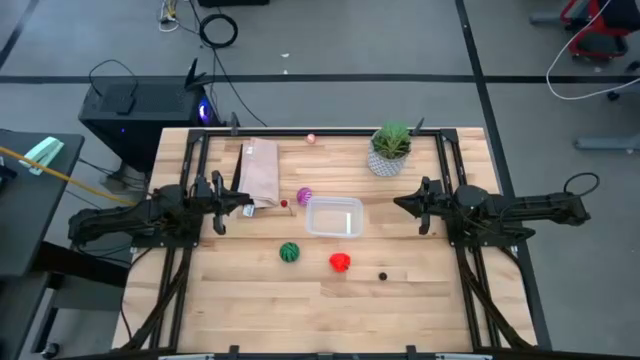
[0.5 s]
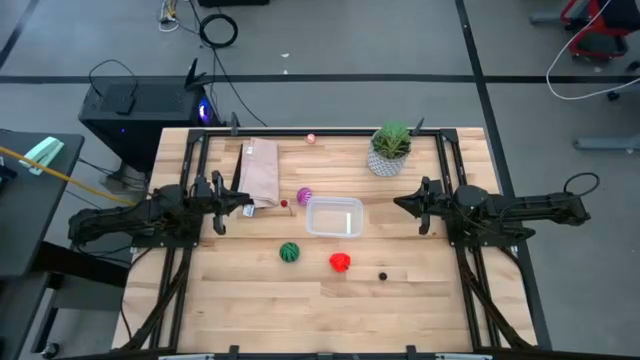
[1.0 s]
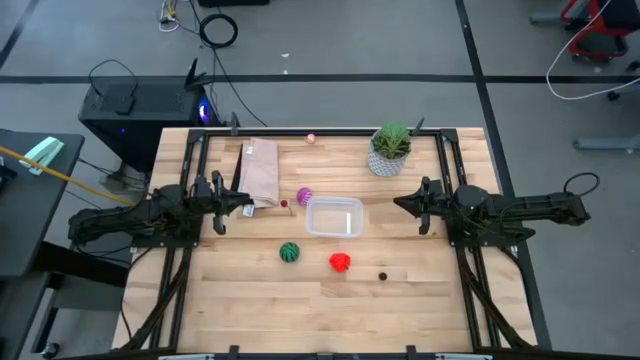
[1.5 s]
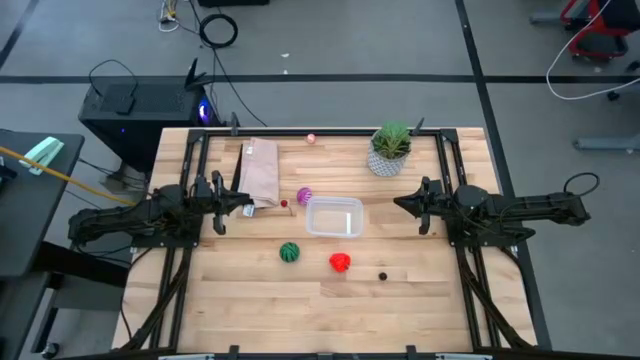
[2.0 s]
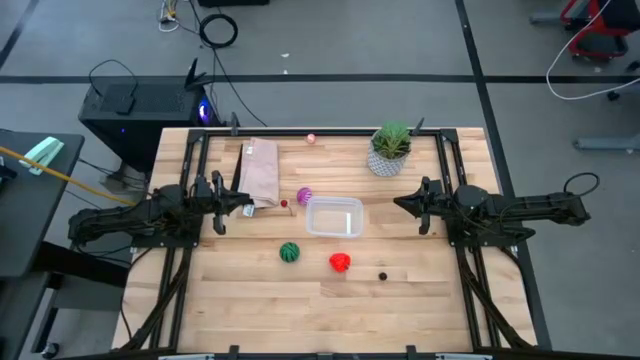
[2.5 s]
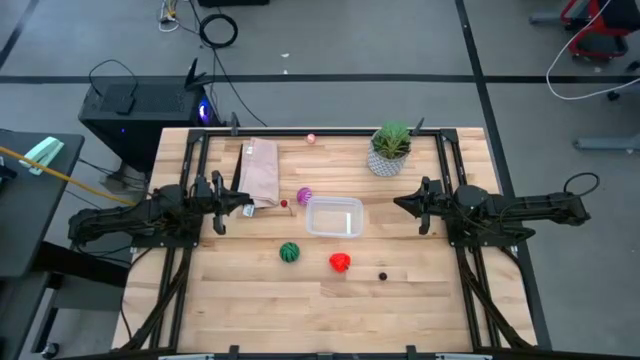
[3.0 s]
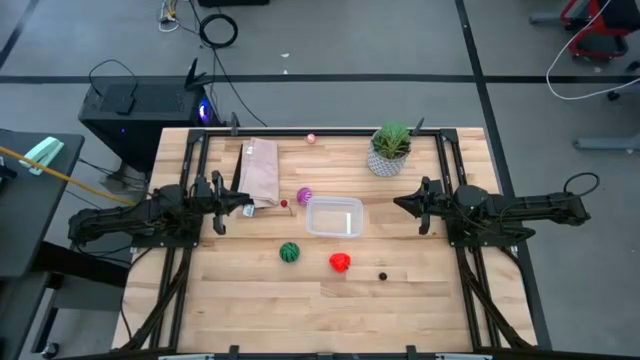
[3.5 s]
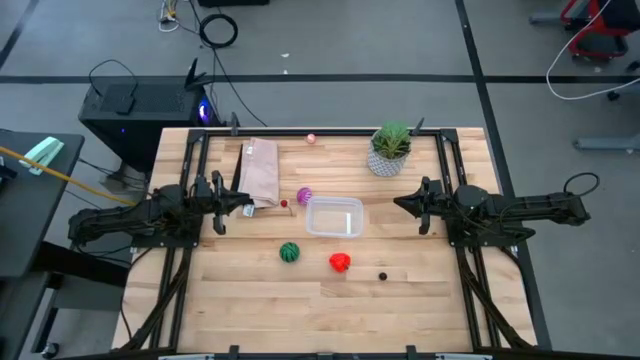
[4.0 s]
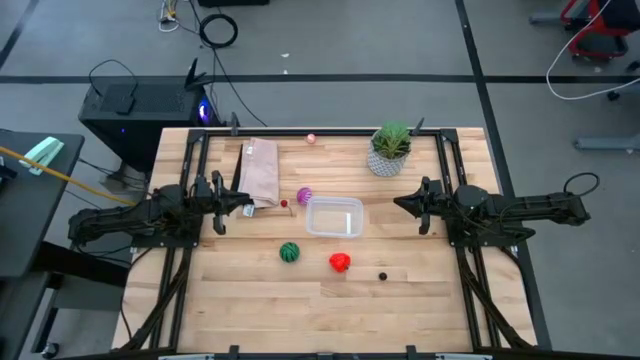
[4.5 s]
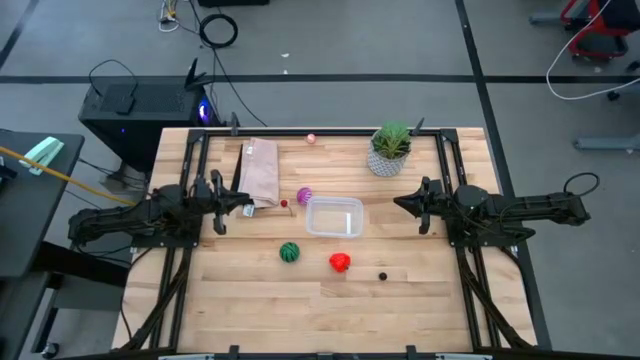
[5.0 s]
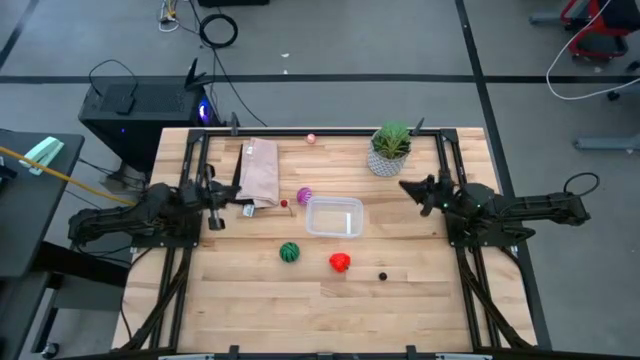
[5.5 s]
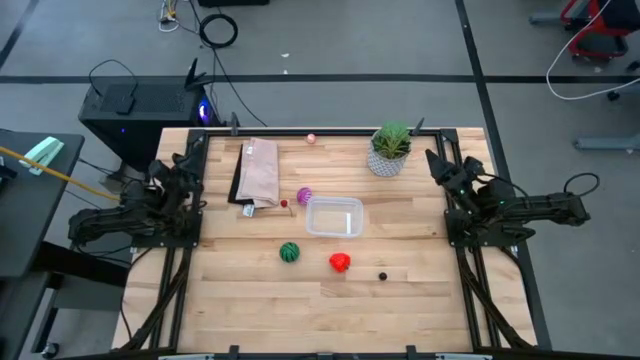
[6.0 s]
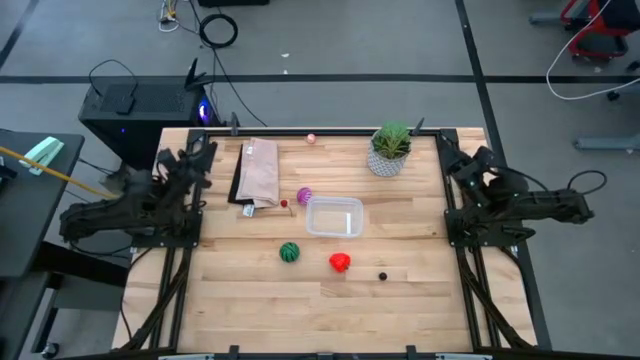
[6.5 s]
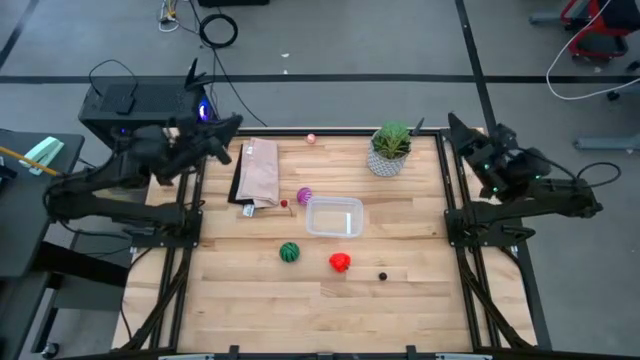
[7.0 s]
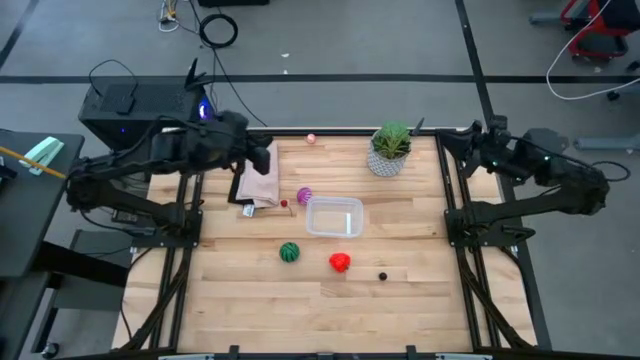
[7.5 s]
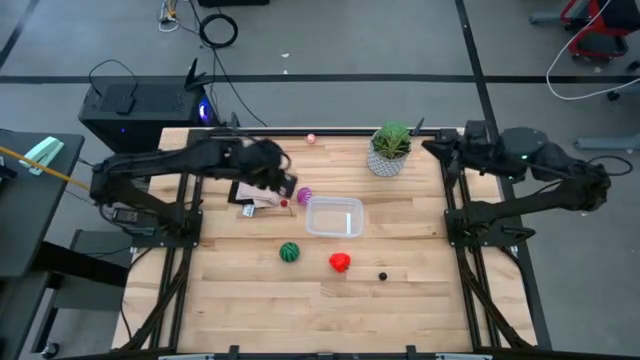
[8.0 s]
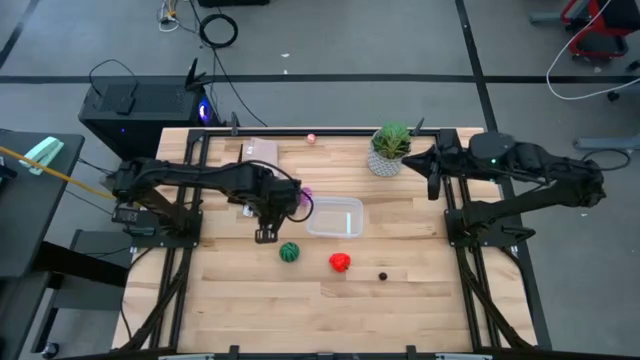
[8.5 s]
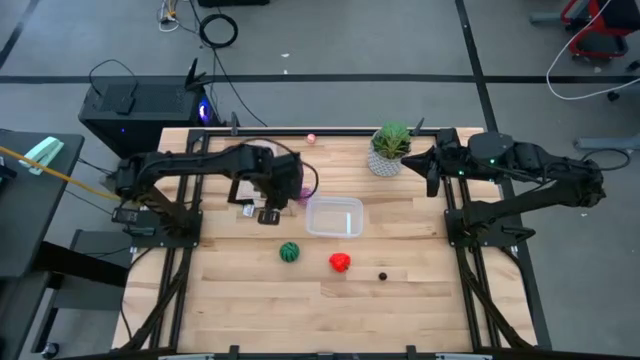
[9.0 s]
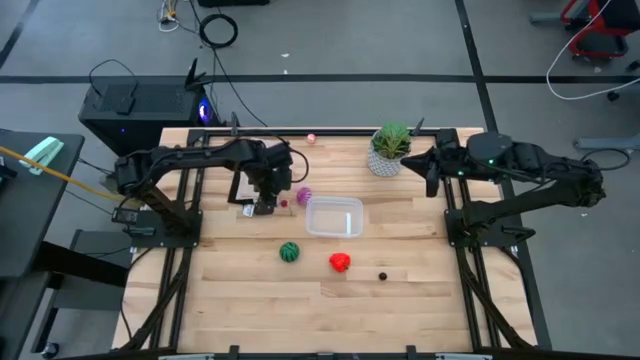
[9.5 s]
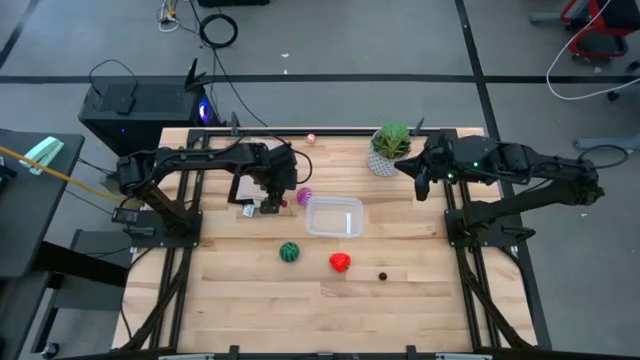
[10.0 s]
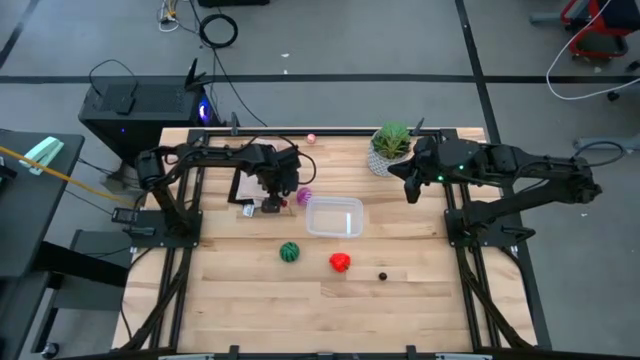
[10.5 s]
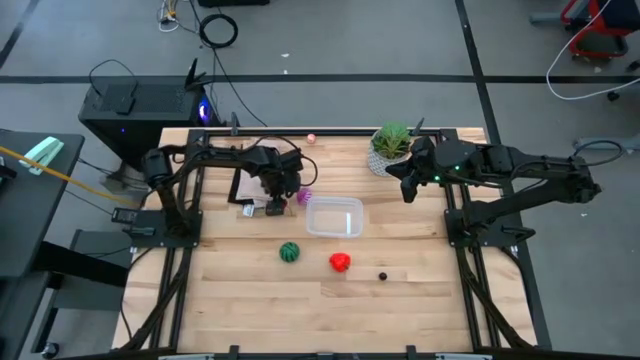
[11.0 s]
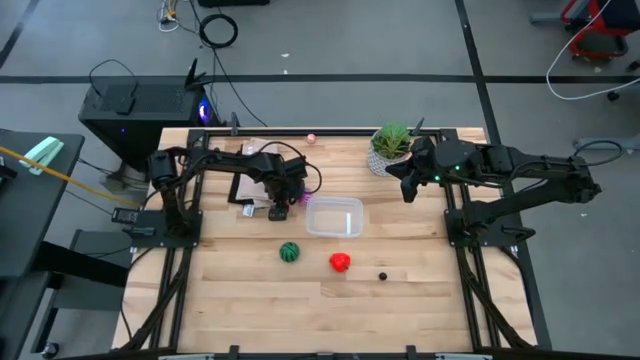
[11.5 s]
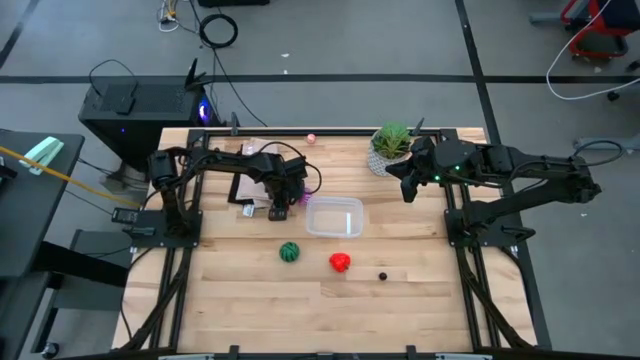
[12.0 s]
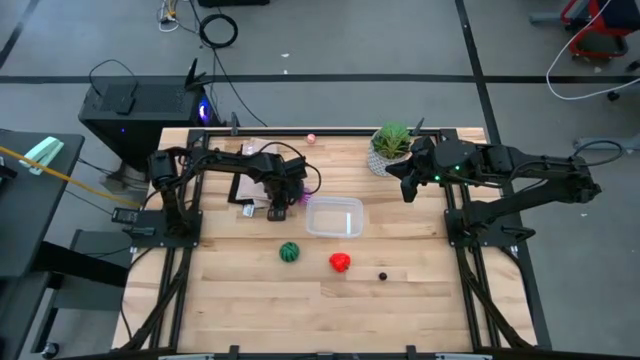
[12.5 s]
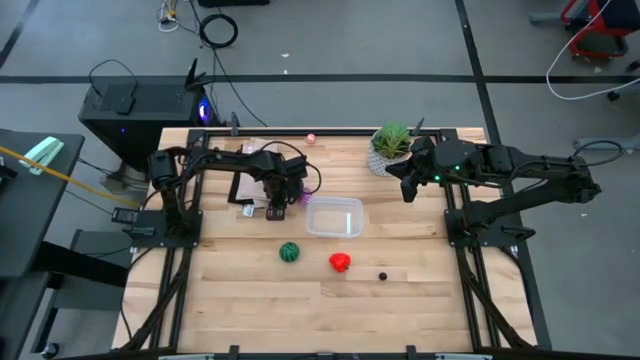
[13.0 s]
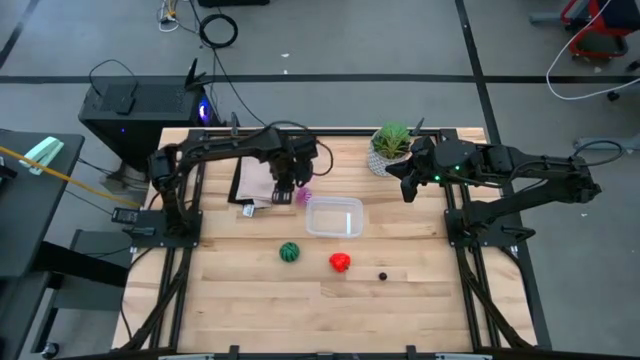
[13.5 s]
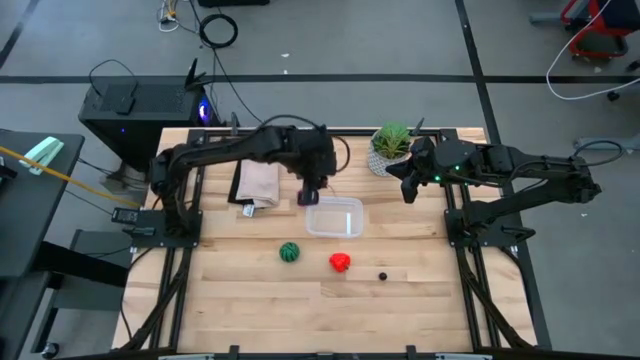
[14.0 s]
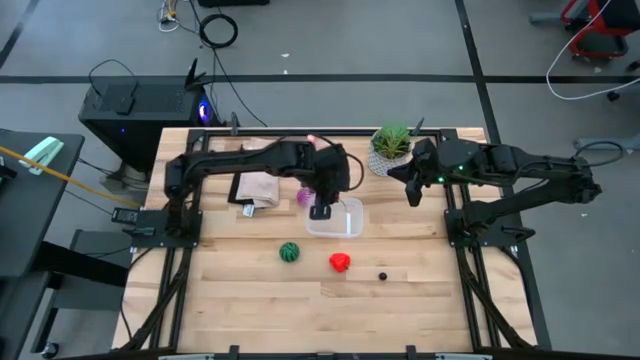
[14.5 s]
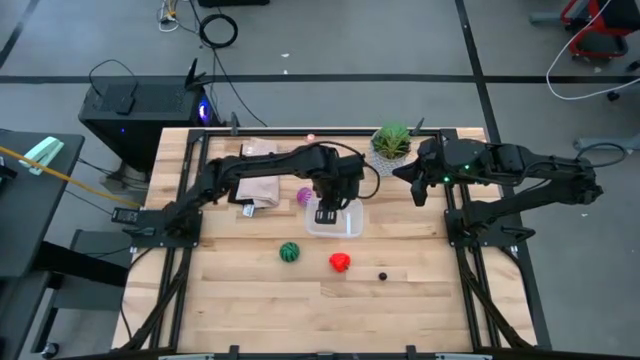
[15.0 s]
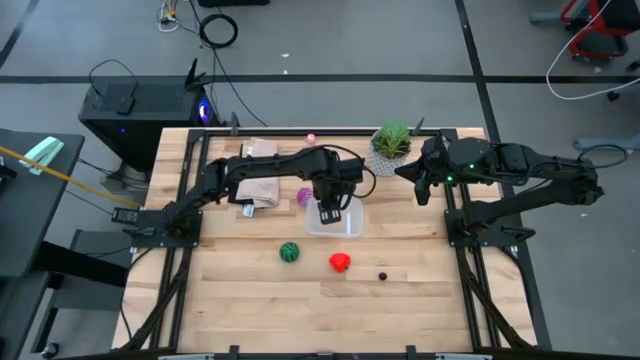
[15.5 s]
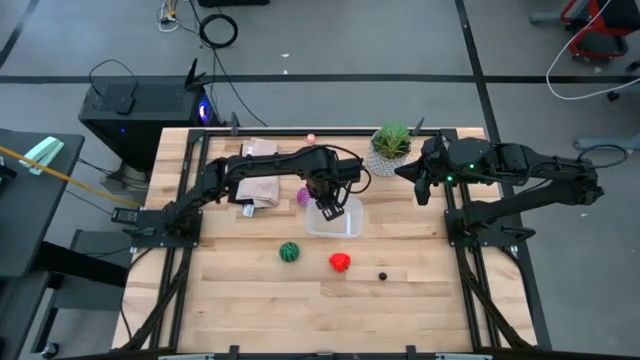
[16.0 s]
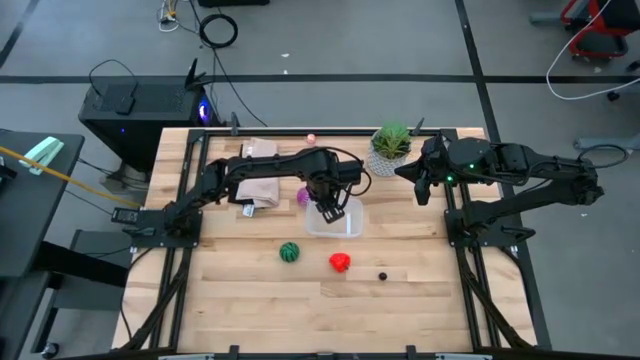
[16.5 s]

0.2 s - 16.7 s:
Task: Pick and placing Produce into tupperware
Put the cherry into the transparent bin
